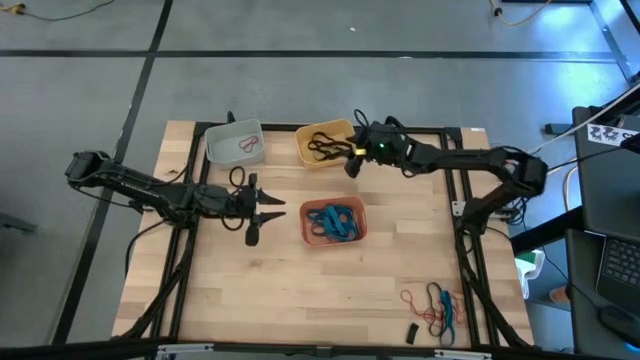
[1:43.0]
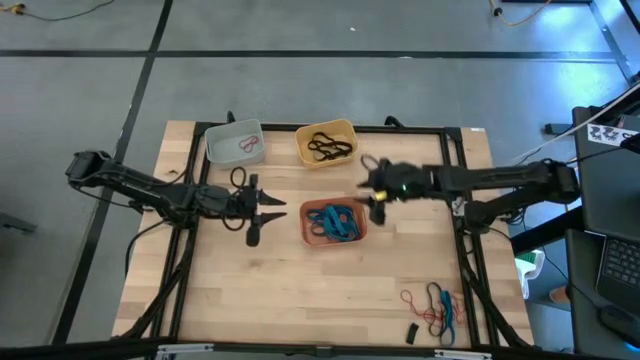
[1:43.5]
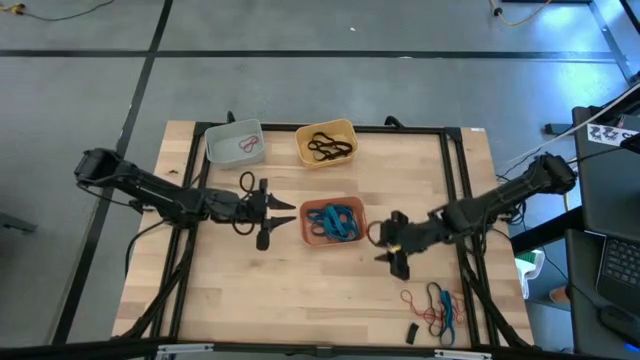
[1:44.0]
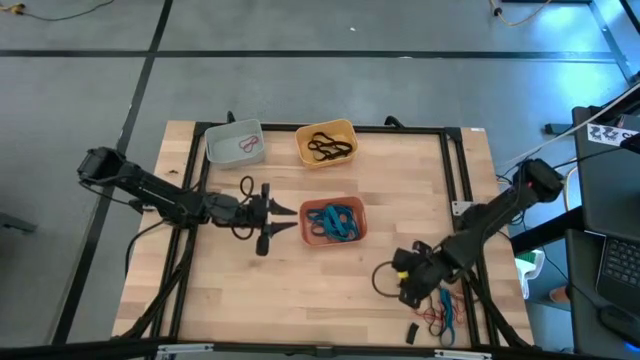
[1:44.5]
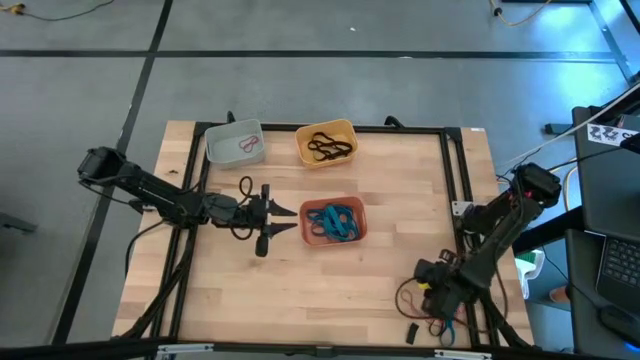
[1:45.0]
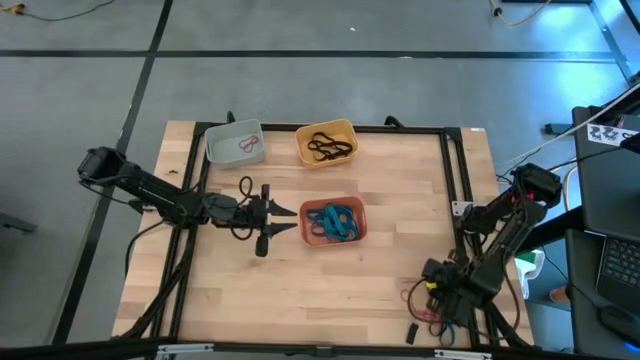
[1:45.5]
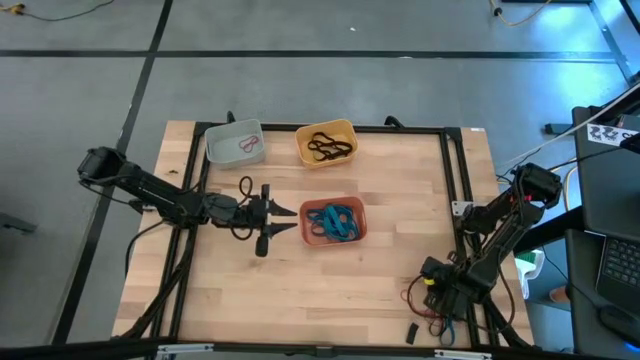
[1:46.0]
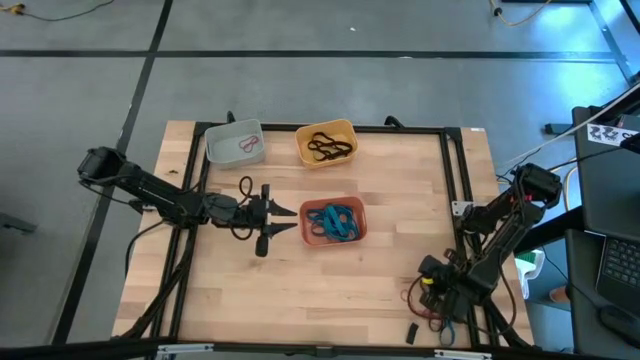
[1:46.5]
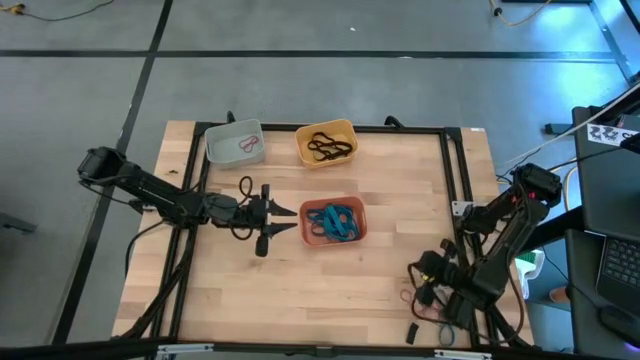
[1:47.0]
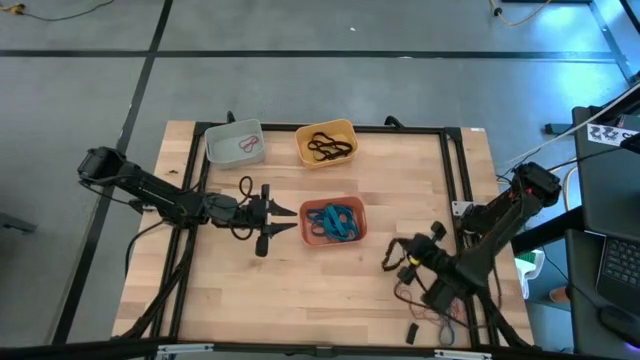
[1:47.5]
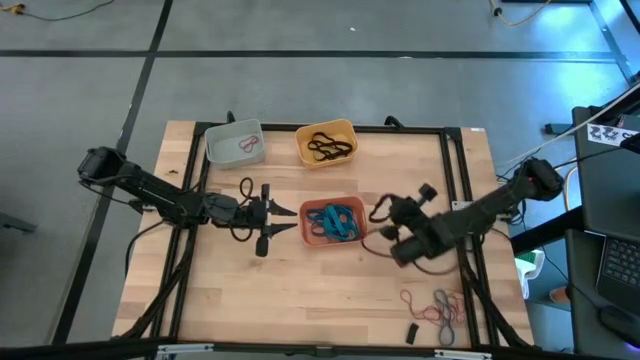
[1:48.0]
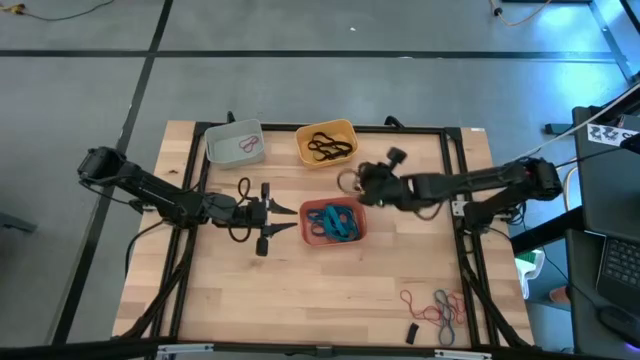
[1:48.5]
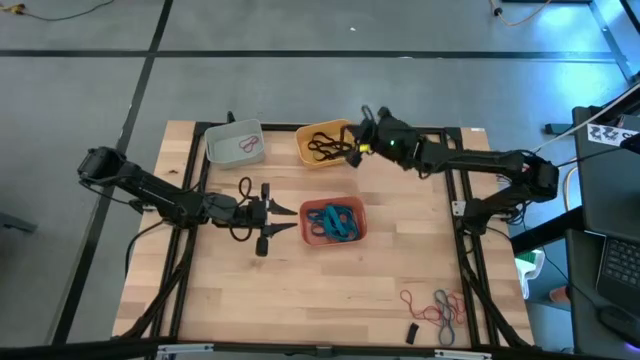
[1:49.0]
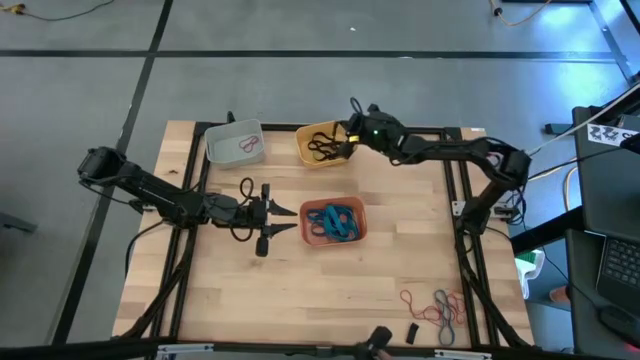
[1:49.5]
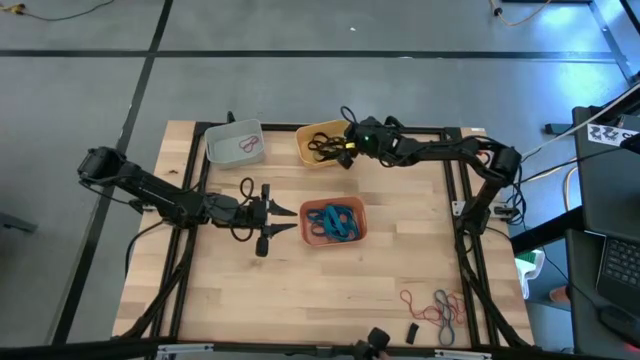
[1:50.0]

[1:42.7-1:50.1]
Task: Sort rubber bands into baskets
Put the black rubber band into the yellow bin

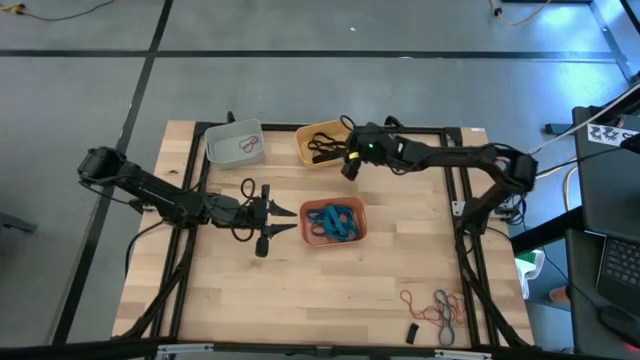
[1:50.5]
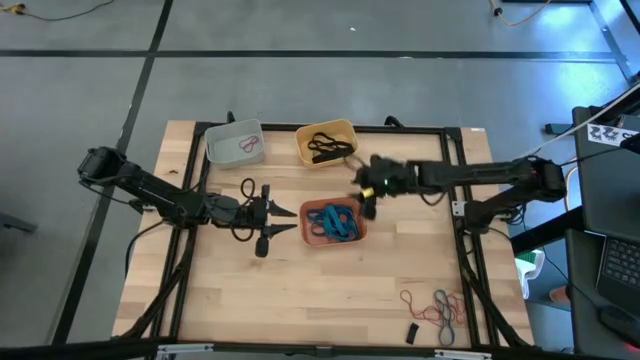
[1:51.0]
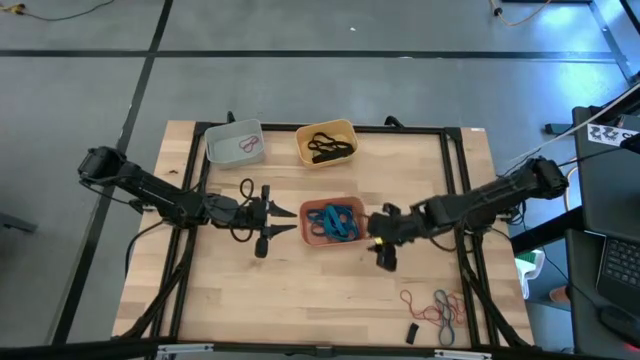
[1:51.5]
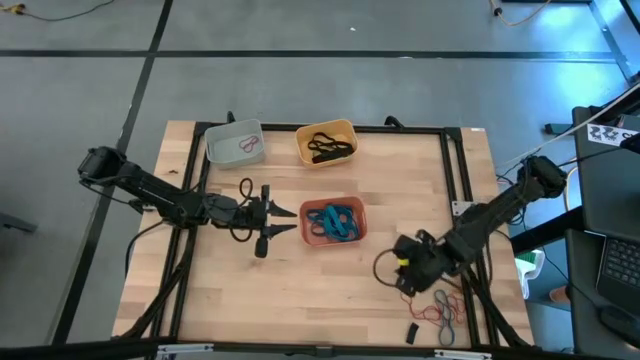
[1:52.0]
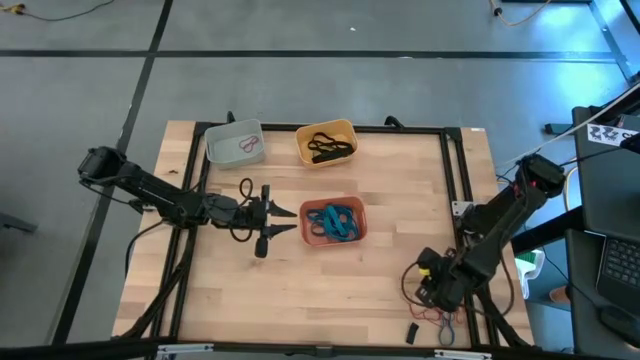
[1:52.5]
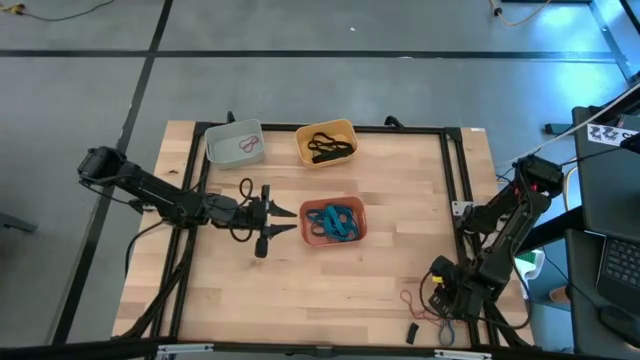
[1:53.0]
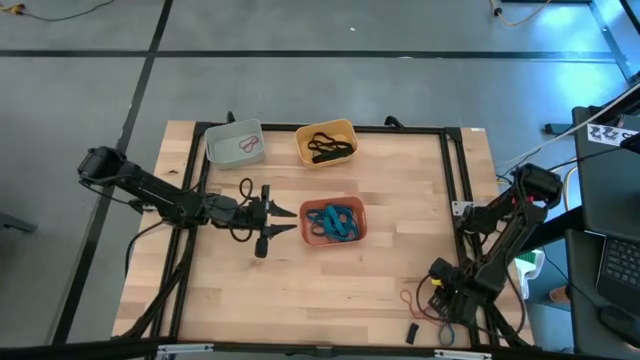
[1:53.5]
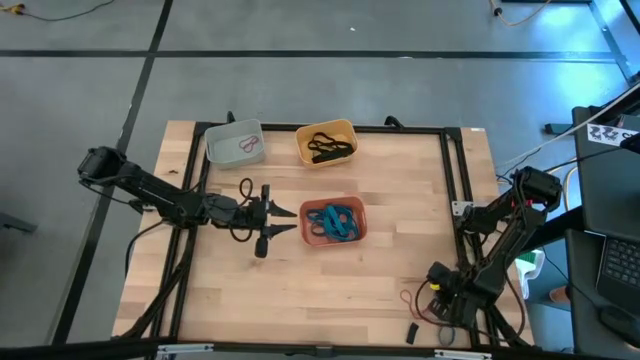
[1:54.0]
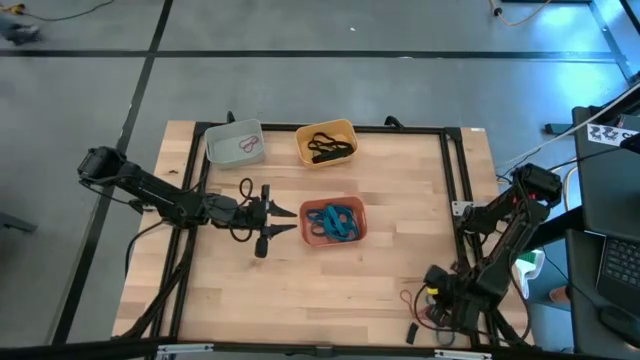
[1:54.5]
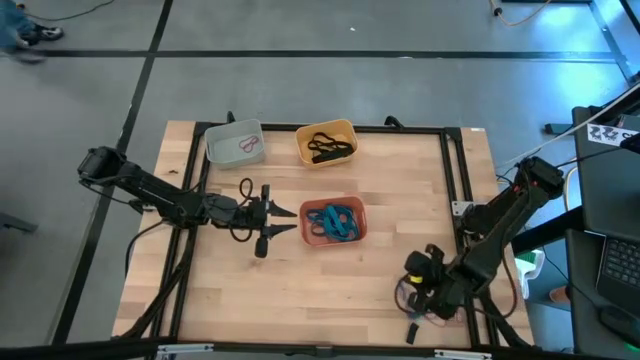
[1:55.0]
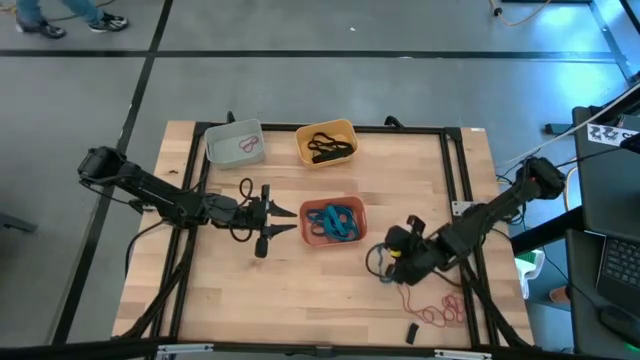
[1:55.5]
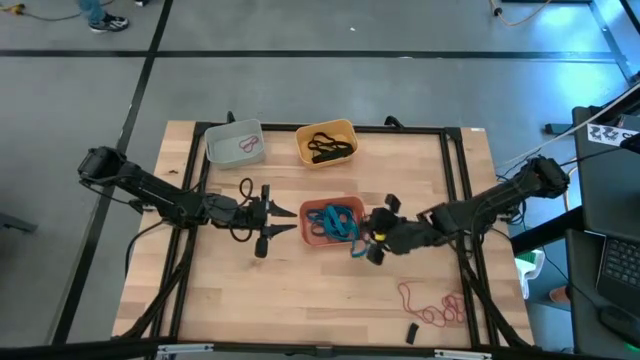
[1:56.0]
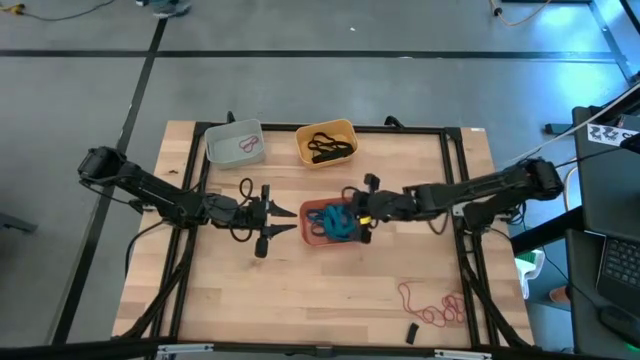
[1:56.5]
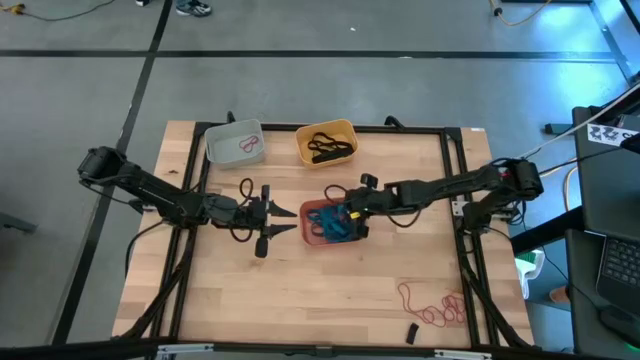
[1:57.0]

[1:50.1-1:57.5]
Put the blue rubber band into the orange bin

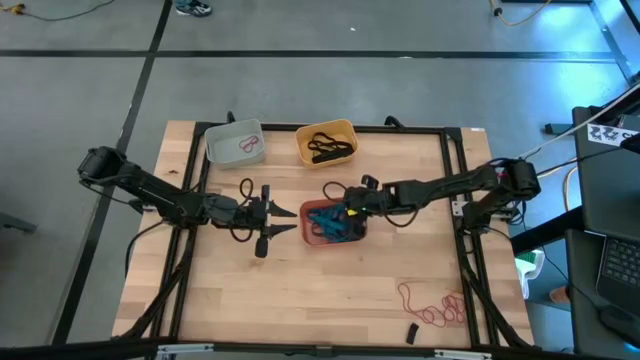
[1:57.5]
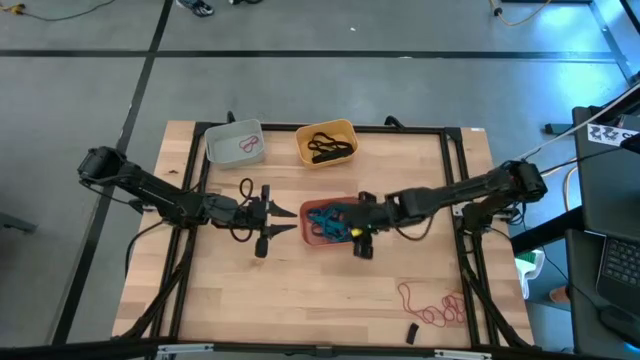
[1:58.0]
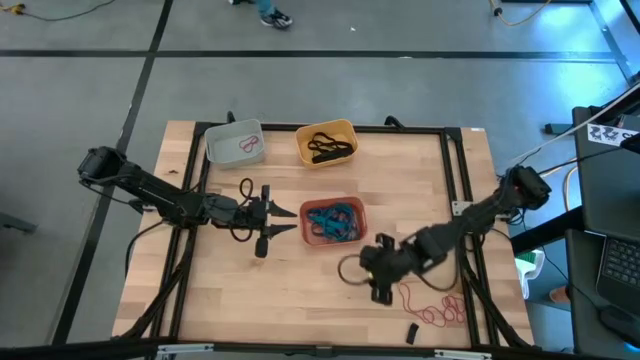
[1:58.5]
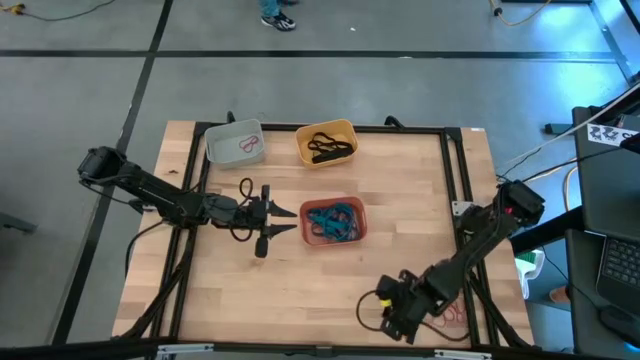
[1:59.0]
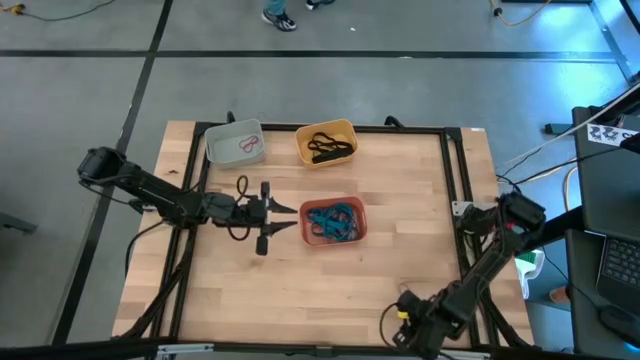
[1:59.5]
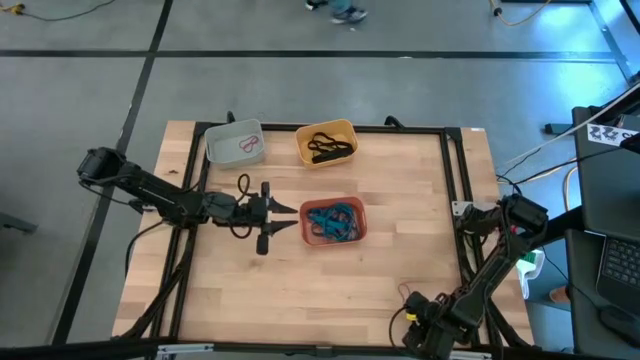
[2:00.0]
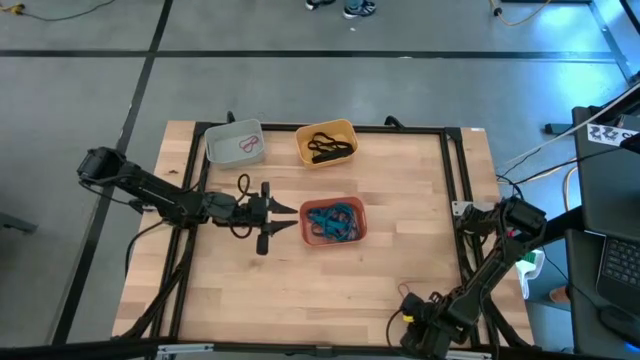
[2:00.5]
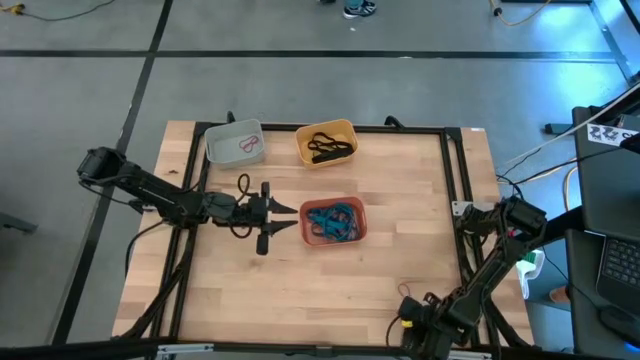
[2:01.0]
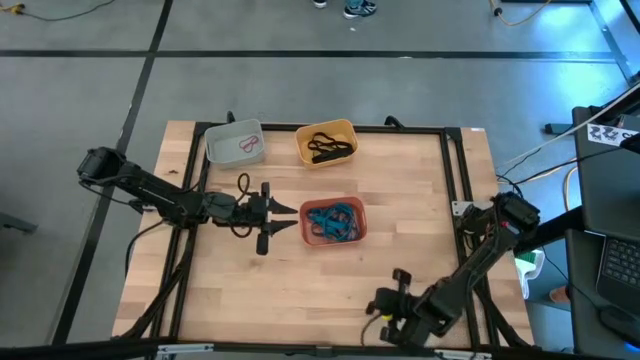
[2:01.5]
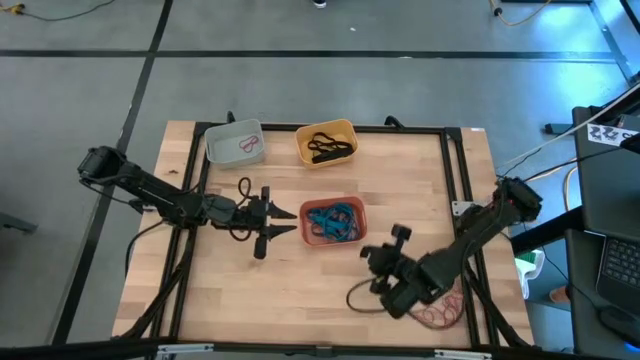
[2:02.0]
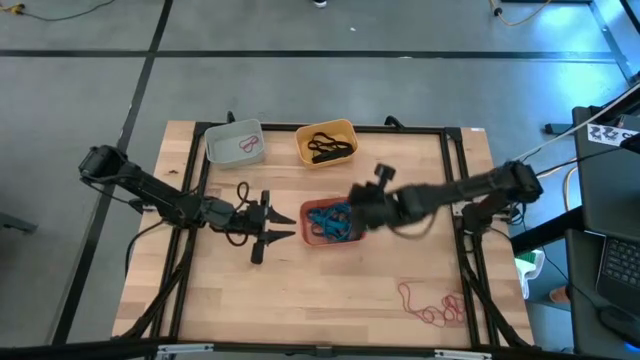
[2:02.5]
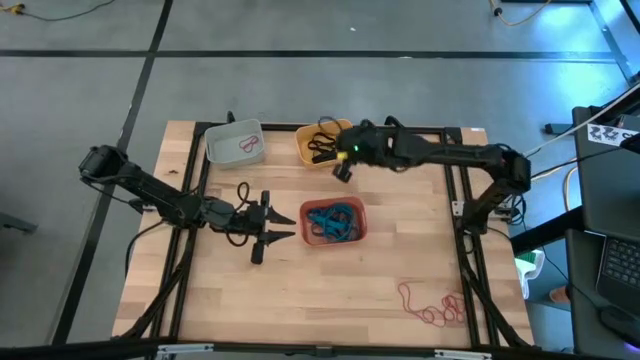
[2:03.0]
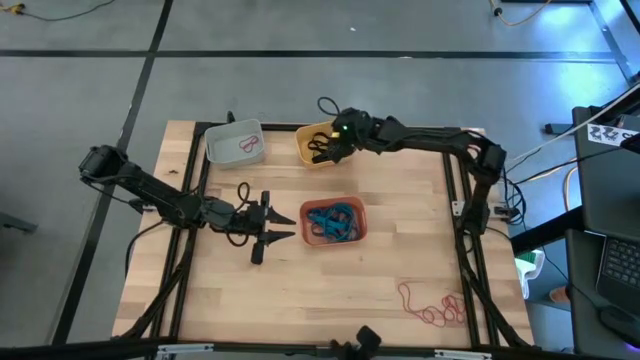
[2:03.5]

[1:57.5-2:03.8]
Put the black rubber band into the yellow bin
